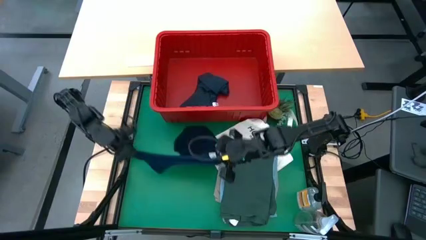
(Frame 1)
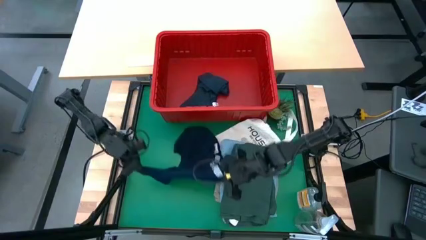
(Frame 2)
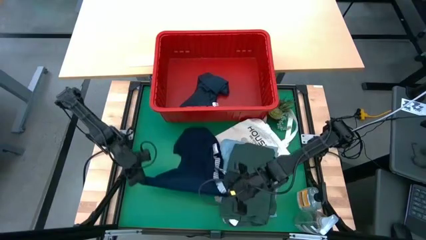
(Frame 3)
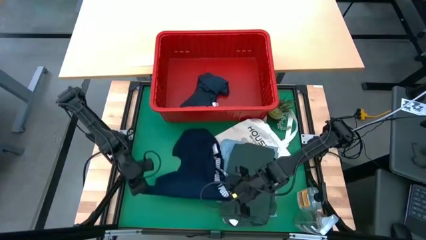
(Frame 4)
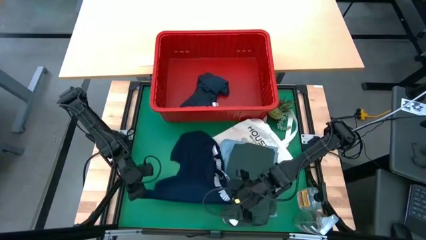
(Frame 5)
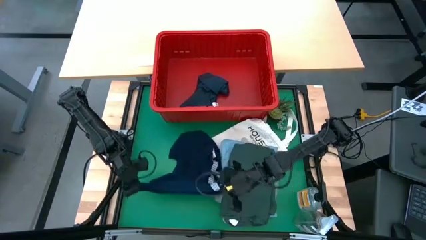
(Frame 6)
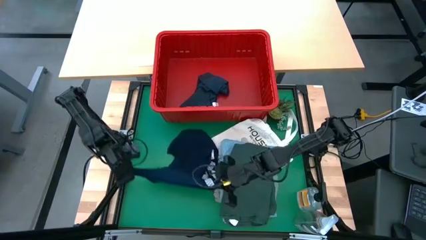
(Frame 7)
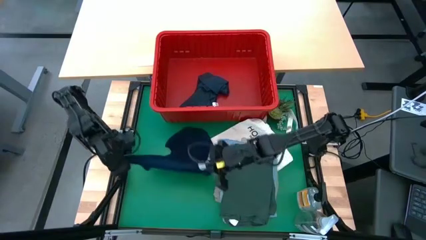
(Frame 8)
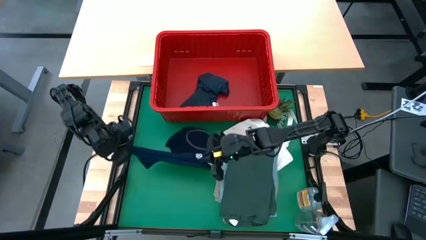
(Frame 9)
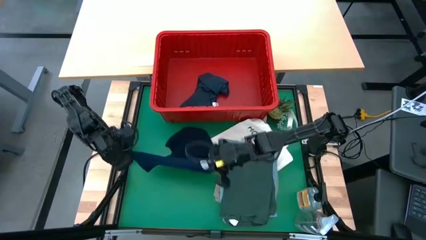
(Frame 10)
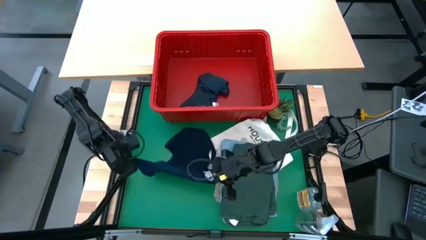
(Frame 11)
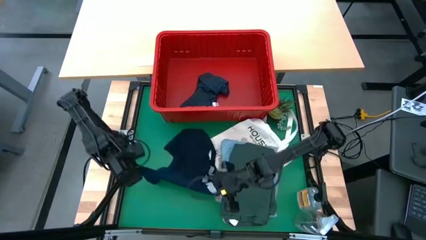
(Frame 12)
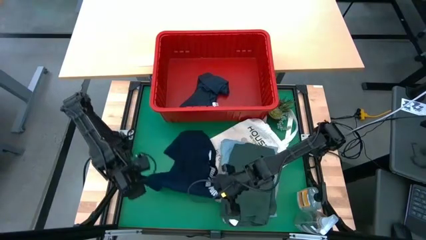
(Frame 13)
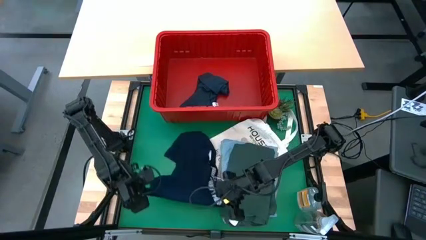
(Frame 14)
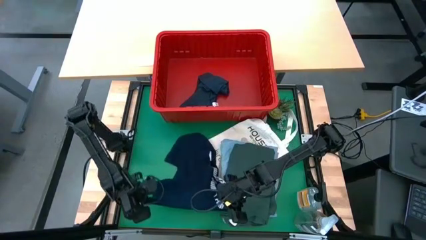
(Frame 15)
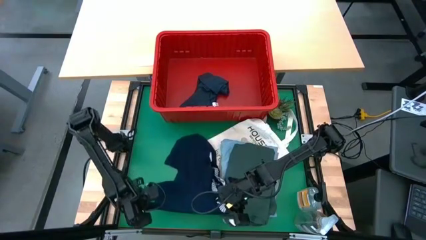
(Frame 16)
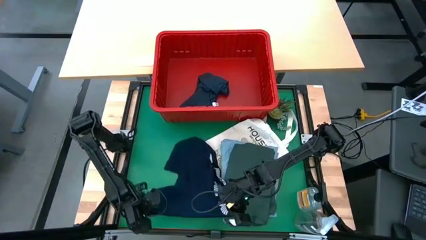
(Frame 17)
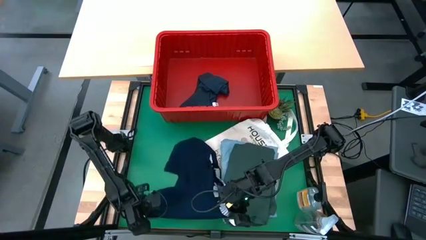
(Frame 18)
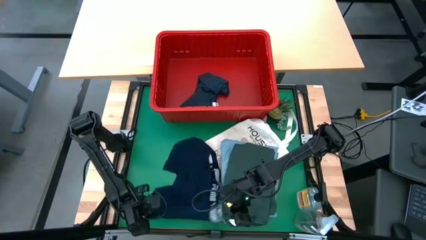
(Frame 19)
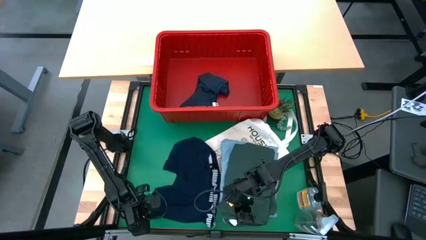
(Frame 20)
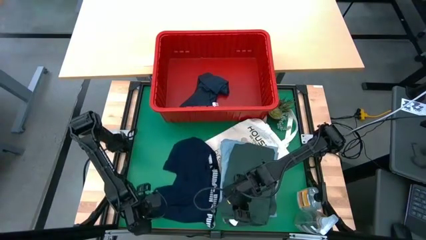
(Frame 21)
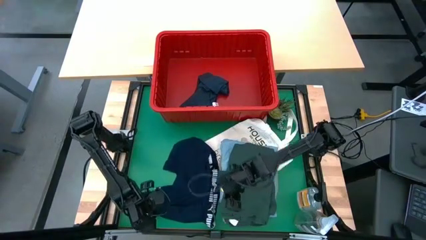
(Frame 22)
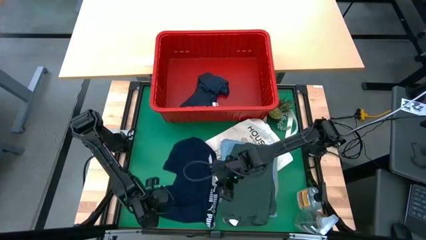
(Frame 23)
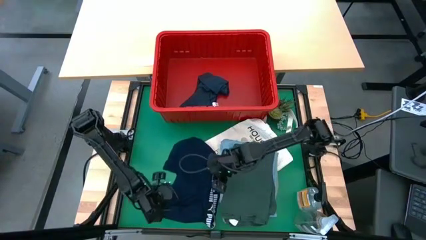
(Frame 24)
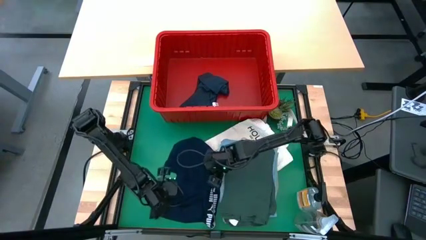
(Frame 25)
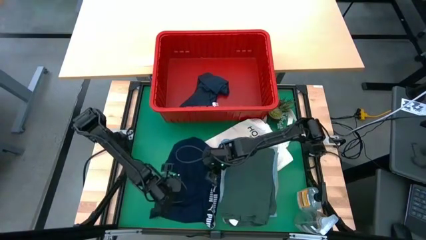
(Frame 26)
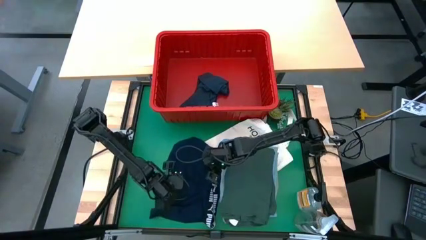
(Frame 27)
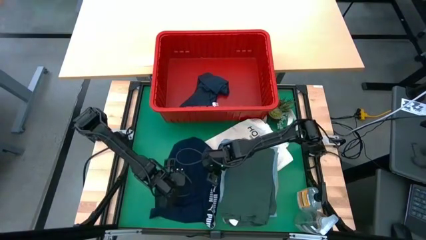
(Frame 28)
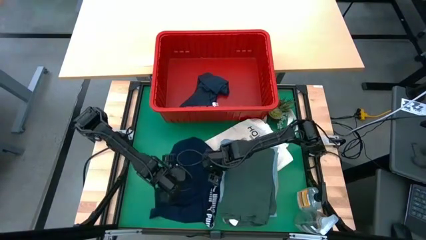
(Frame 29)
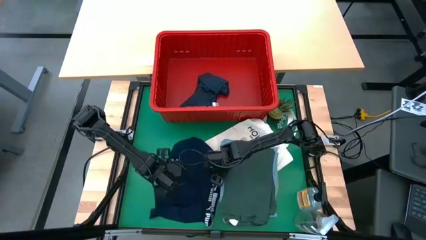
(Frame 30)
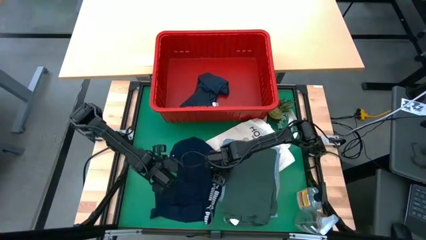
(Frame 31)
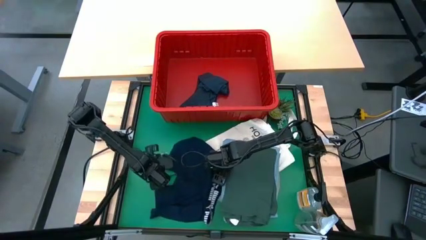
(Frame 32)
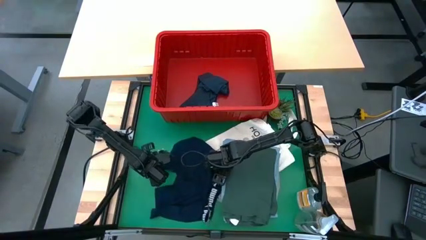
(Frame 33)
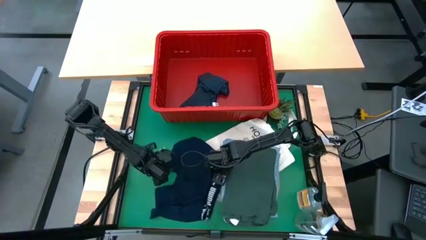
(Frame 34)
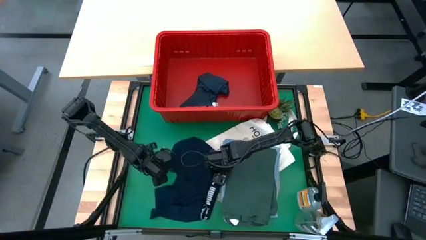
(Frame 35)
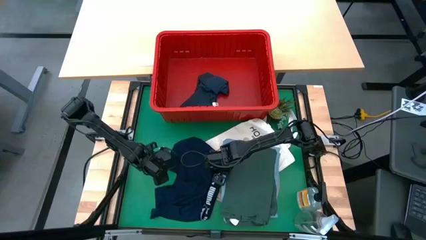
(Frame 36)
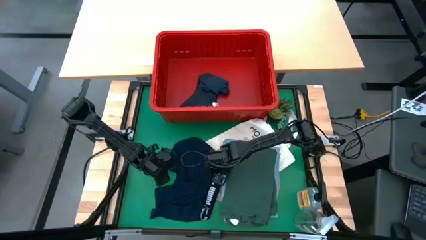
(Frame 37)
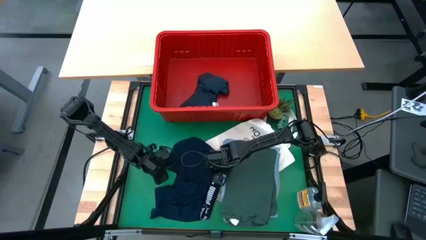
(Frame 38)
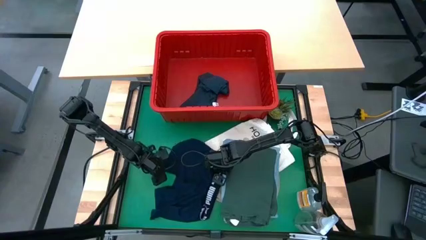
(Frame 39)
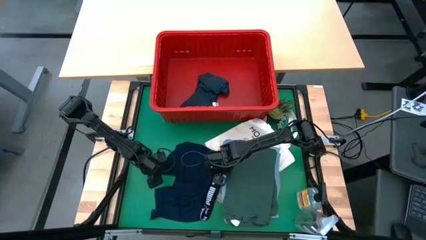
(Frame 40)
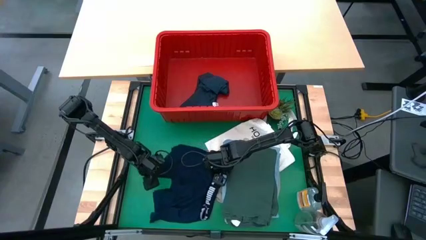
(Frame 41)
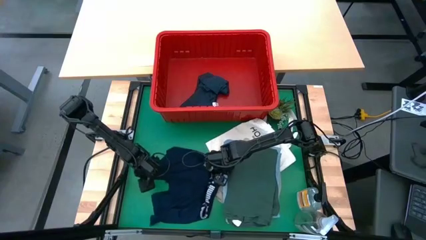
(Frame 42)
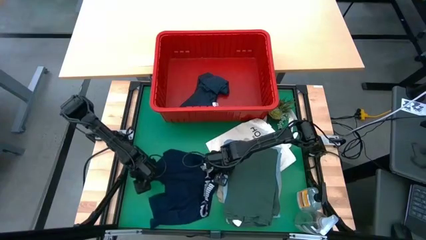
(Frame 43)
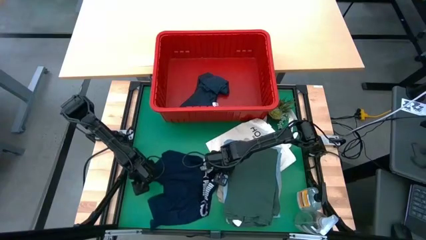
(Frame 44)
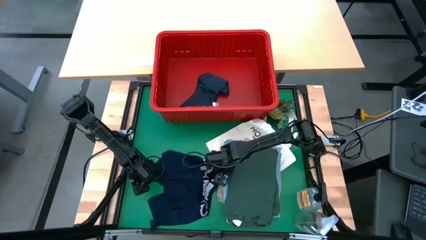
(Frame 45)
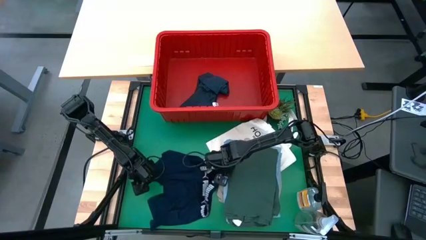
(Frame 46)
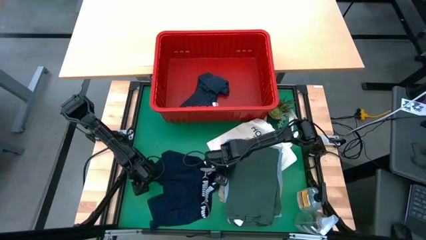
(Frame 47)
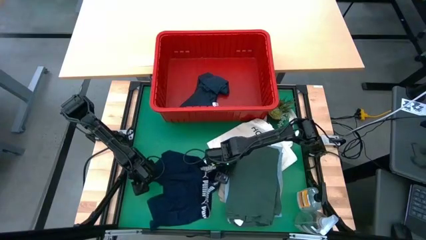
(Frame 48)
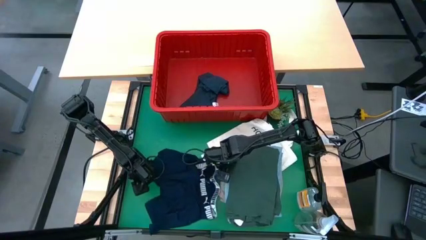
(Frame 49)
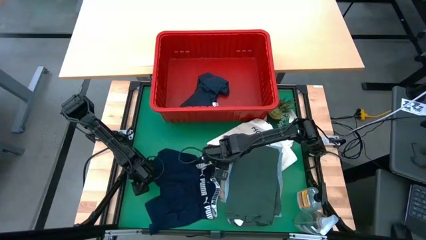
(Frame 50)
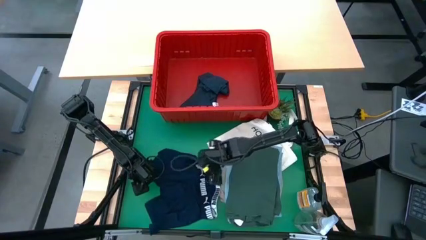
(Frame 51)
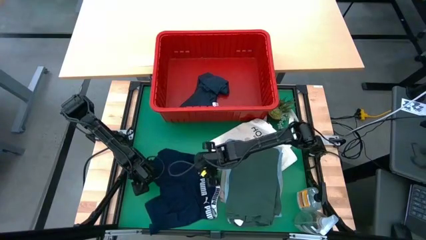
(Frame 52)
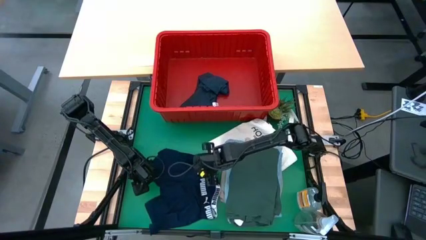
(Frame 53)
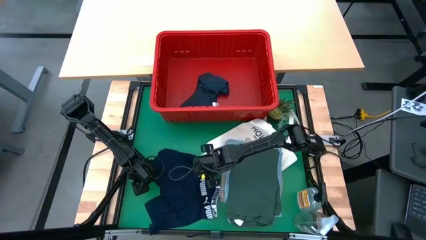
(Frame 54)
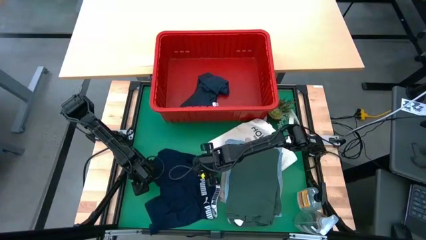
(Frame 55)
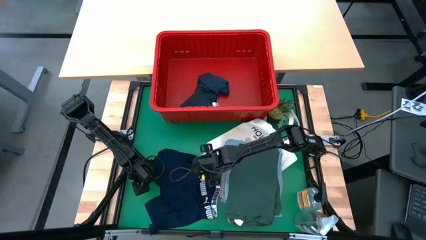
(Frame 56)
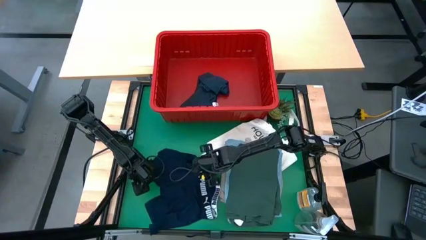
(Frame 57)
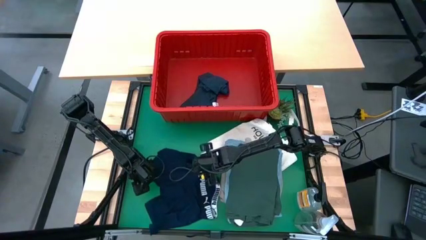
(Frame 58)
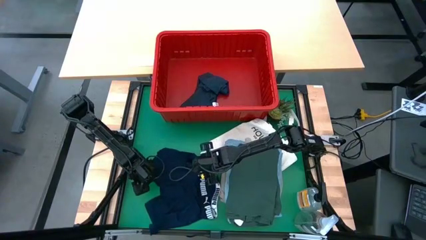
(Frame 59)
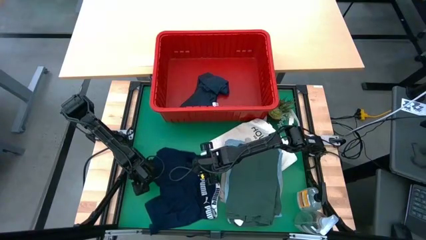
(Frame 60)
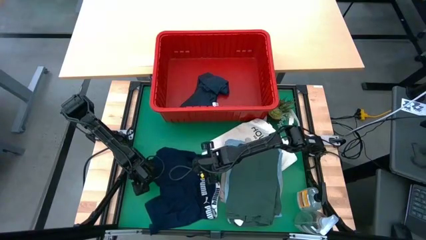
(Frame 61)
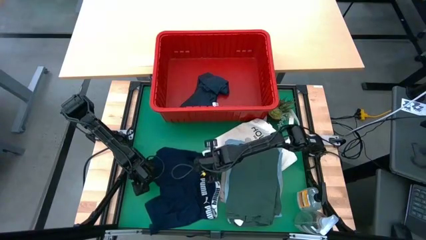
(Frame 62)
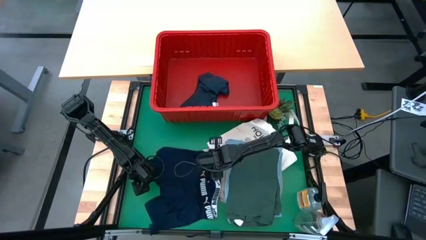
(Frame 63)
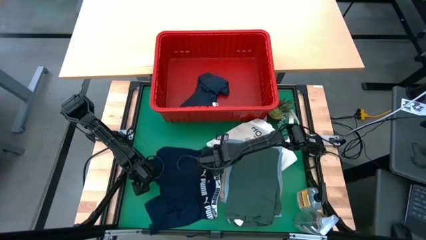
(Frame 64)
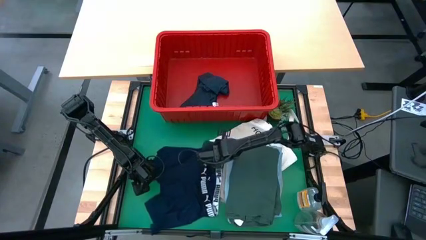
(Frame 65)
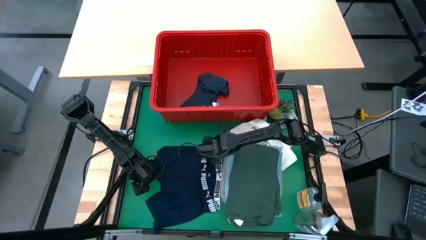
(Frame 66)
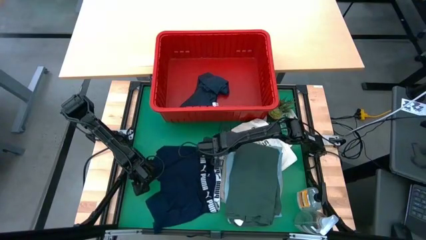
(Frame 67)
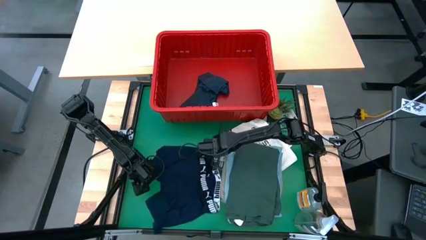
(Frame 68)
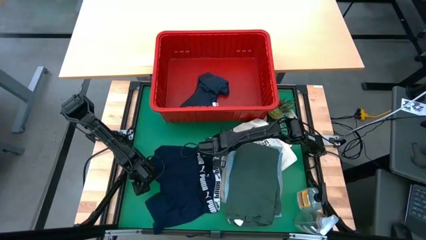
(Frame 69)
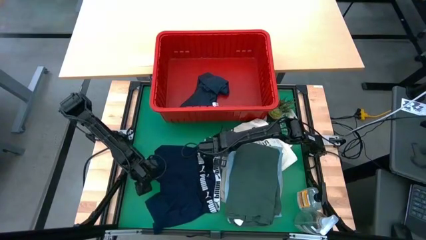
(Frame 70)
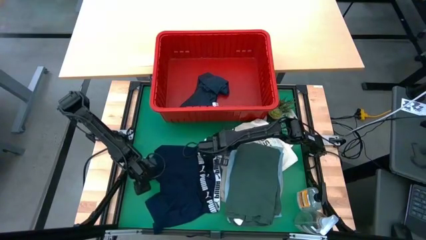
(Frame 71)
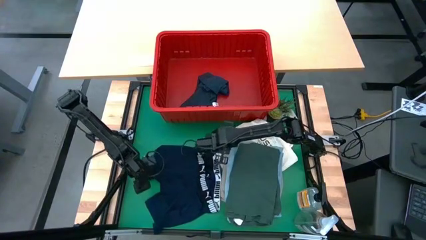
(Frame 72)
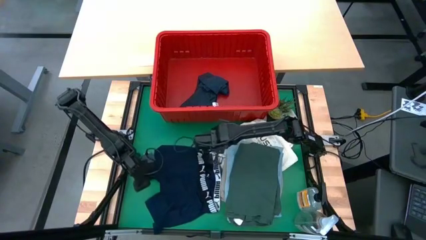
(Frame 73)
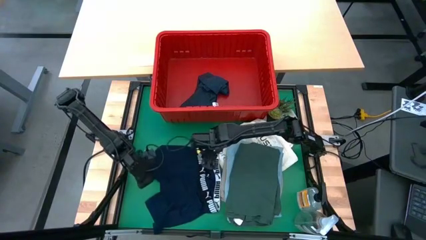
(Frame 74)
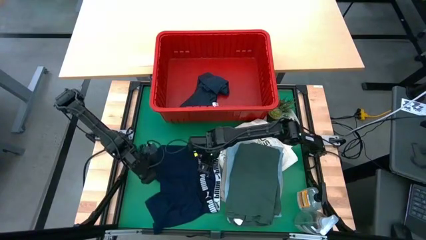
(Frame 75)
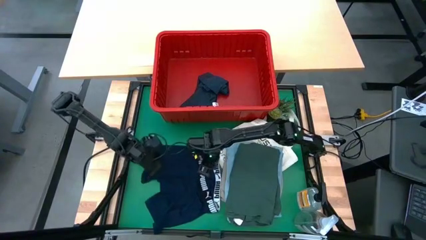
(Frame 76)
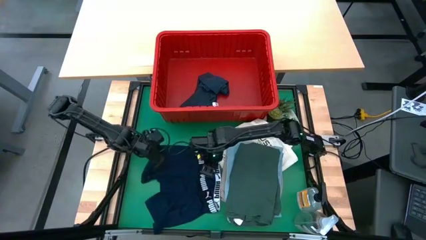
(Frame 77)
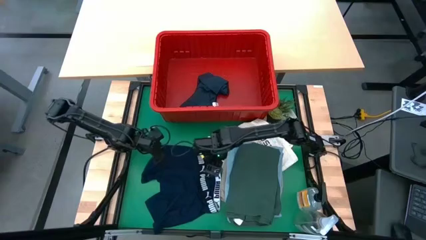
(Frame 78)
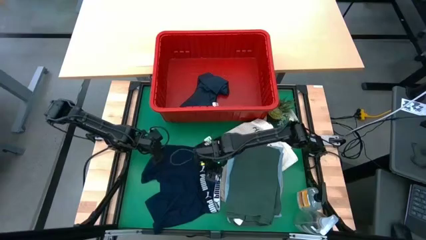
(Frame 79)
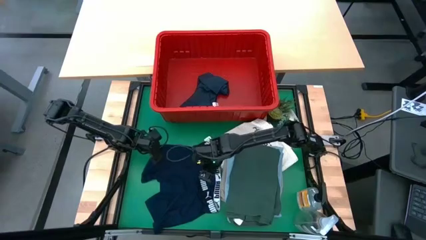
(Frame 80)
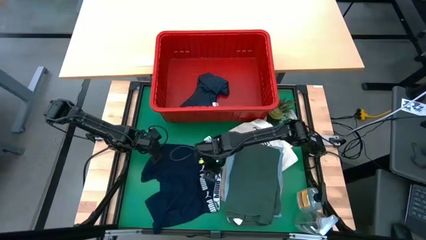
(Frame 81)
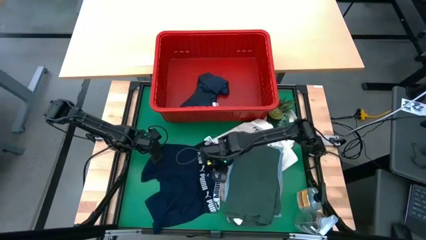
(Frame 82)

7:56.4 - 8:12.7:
Task: Fold Laundry from Bin
Fold the dark blue boxer
